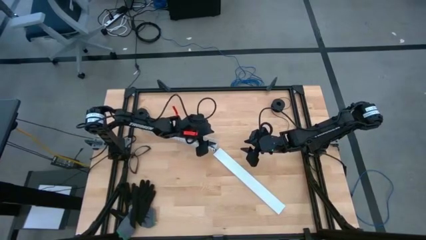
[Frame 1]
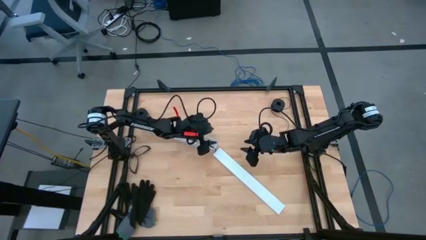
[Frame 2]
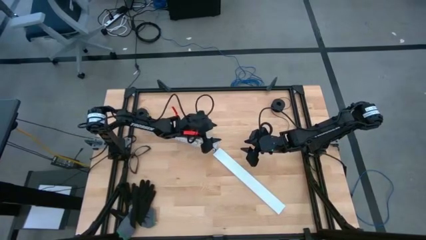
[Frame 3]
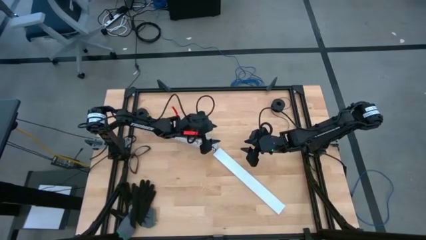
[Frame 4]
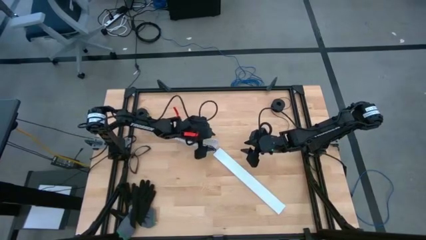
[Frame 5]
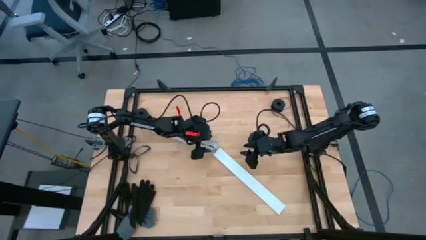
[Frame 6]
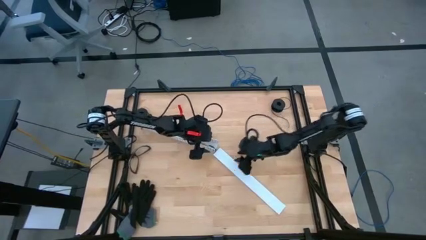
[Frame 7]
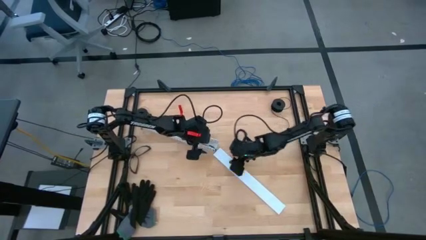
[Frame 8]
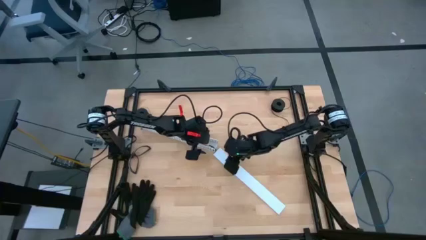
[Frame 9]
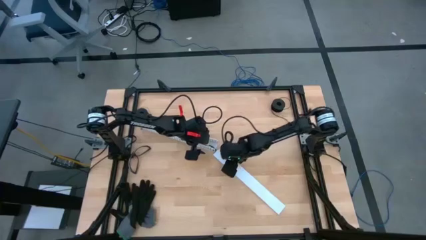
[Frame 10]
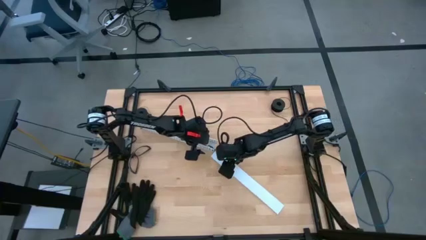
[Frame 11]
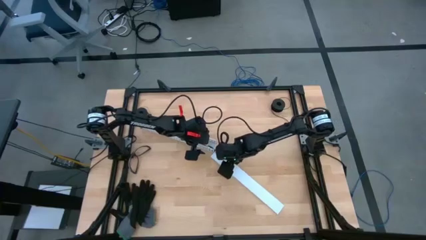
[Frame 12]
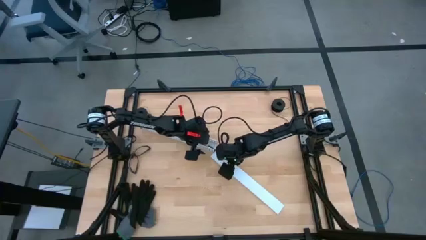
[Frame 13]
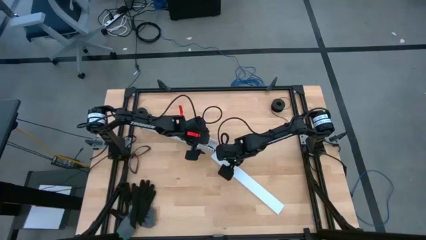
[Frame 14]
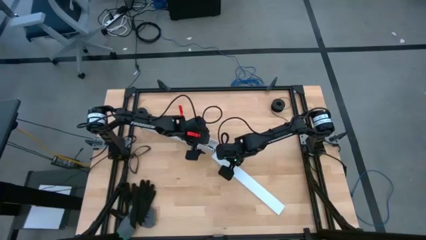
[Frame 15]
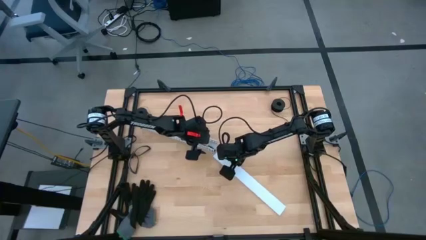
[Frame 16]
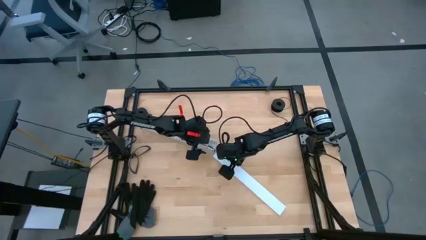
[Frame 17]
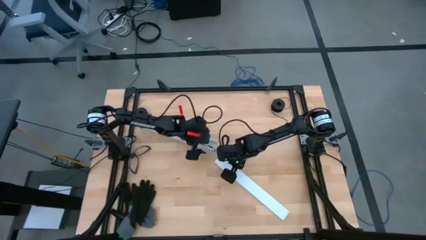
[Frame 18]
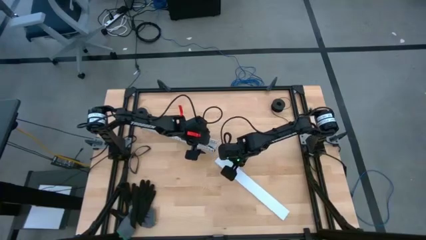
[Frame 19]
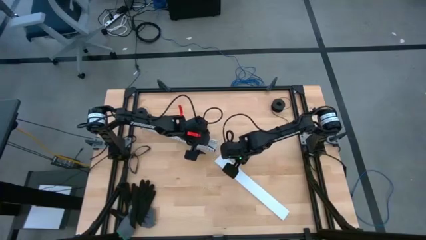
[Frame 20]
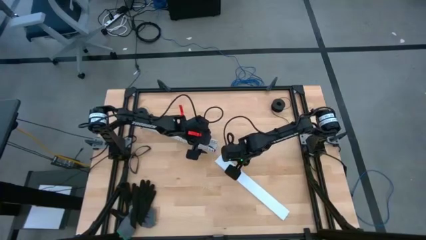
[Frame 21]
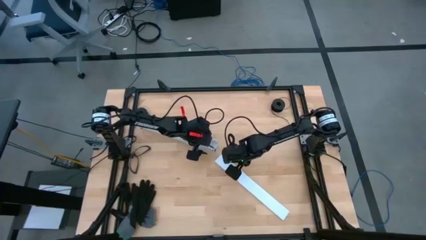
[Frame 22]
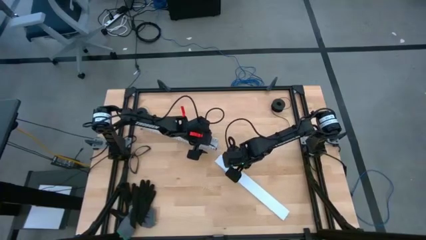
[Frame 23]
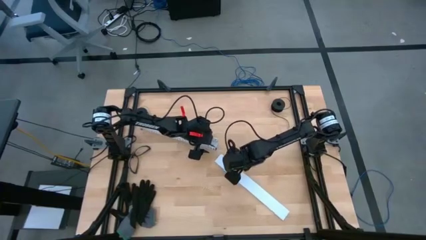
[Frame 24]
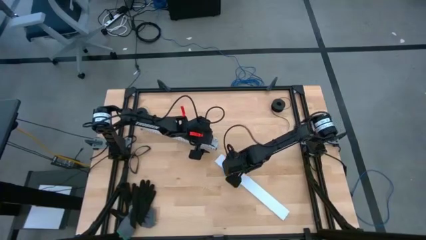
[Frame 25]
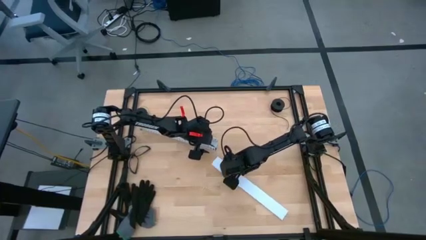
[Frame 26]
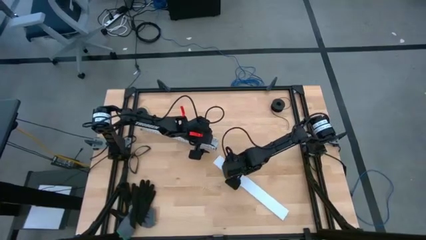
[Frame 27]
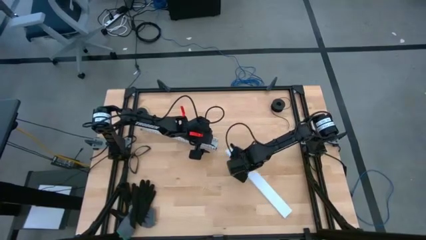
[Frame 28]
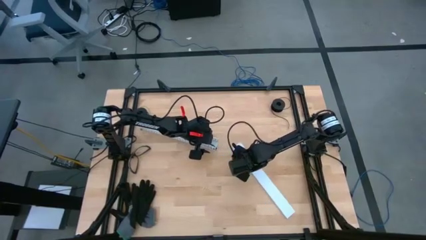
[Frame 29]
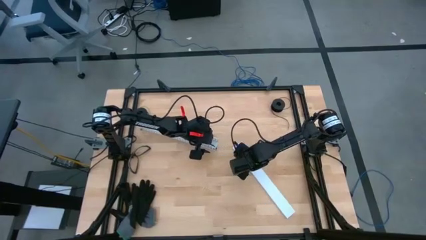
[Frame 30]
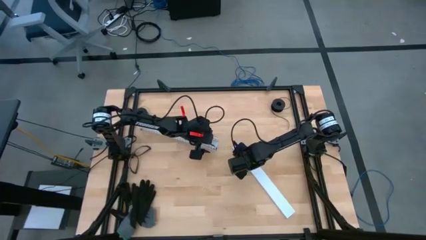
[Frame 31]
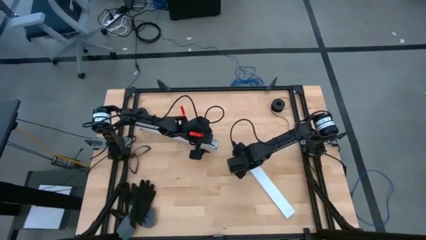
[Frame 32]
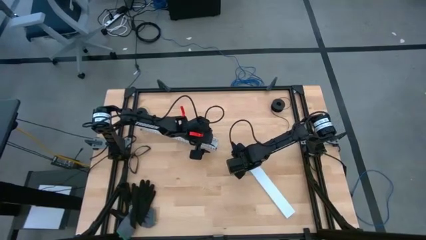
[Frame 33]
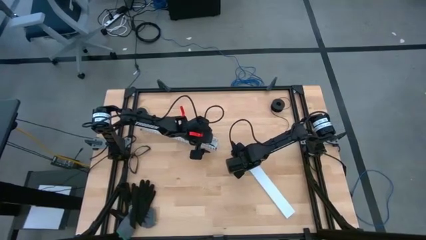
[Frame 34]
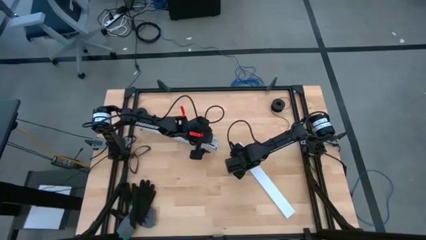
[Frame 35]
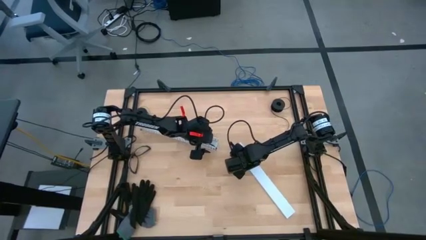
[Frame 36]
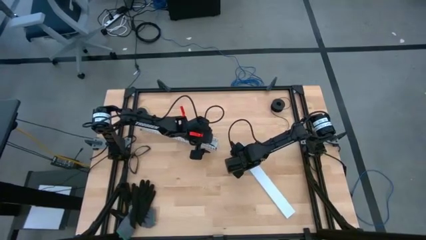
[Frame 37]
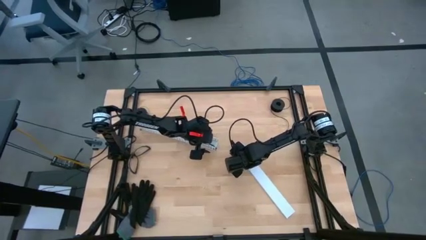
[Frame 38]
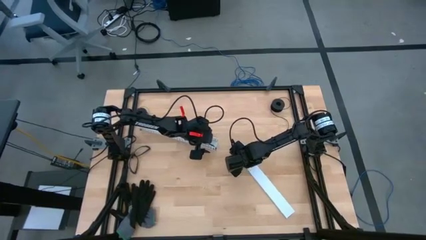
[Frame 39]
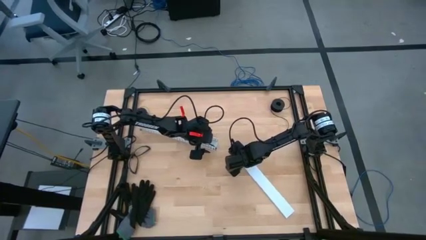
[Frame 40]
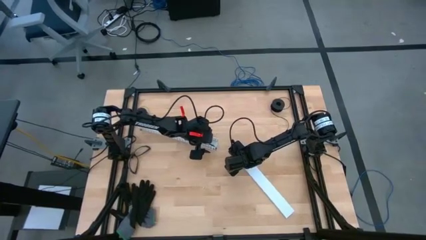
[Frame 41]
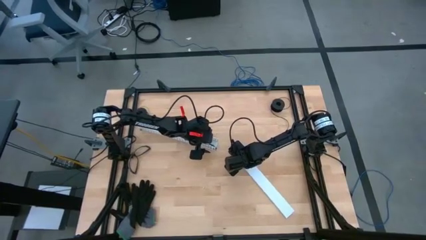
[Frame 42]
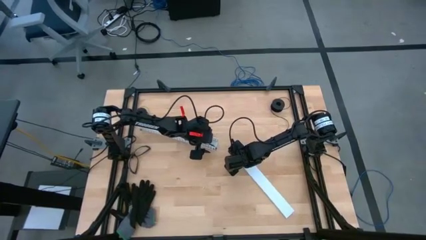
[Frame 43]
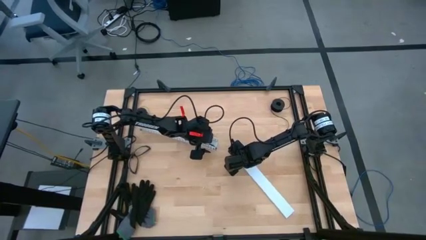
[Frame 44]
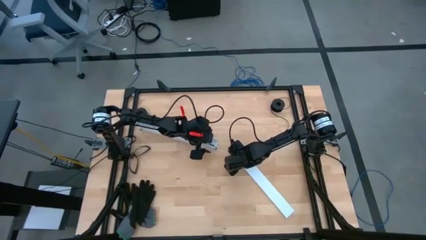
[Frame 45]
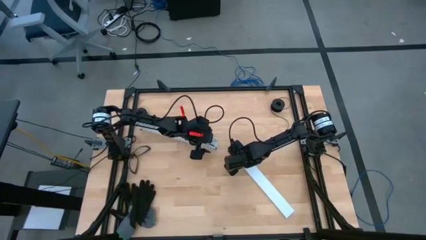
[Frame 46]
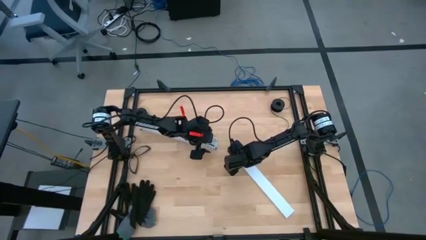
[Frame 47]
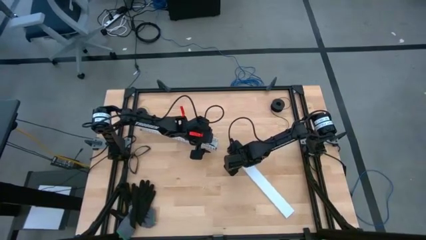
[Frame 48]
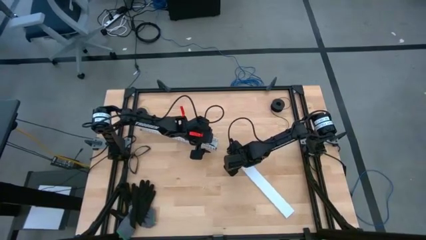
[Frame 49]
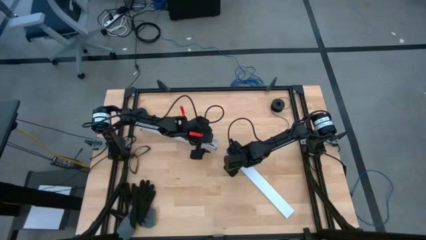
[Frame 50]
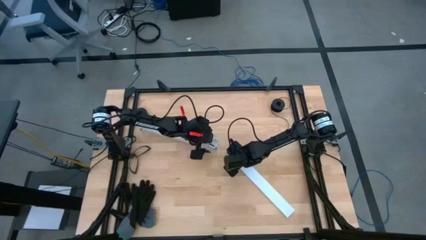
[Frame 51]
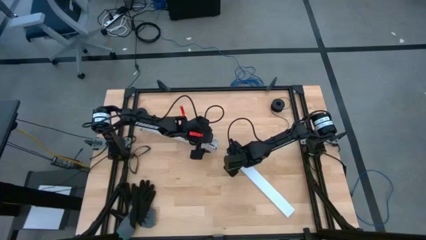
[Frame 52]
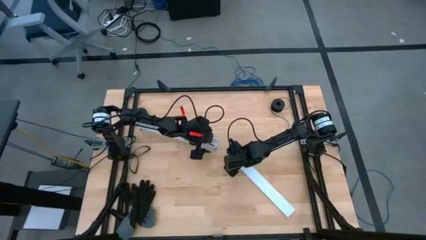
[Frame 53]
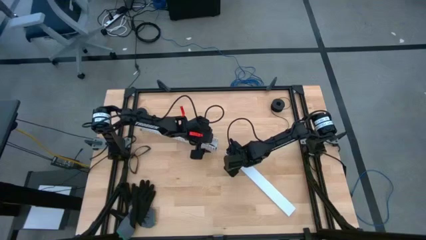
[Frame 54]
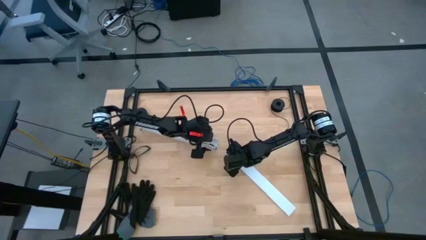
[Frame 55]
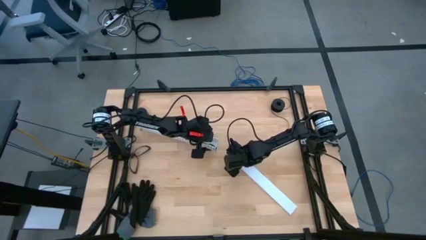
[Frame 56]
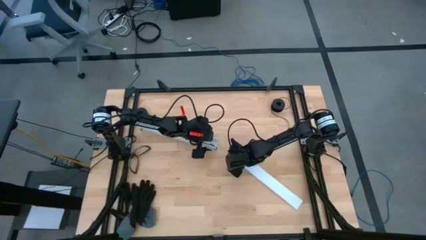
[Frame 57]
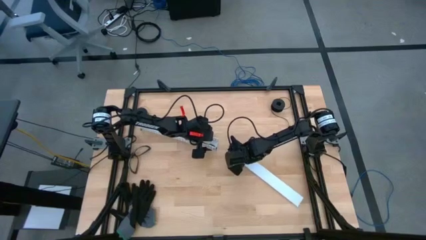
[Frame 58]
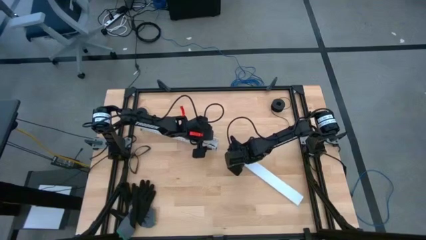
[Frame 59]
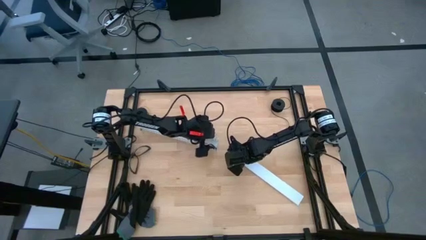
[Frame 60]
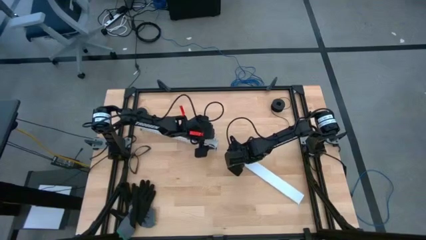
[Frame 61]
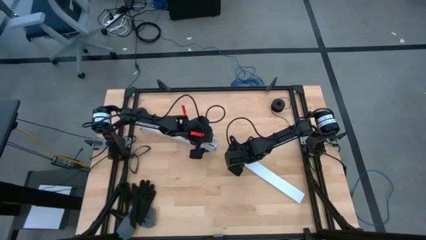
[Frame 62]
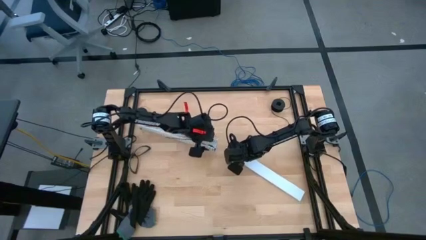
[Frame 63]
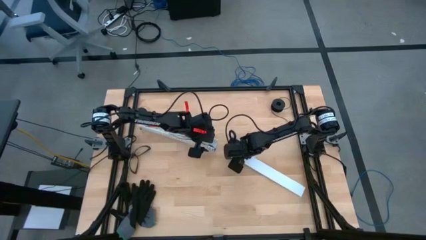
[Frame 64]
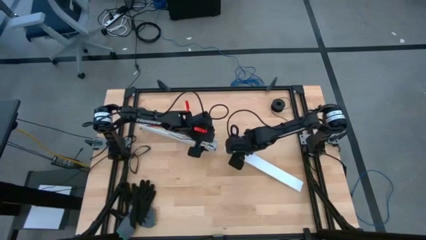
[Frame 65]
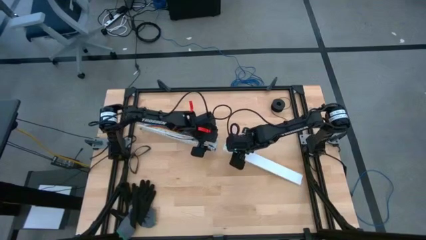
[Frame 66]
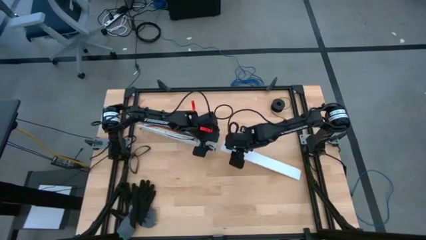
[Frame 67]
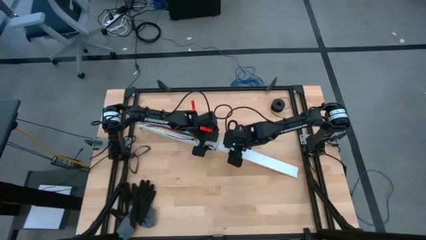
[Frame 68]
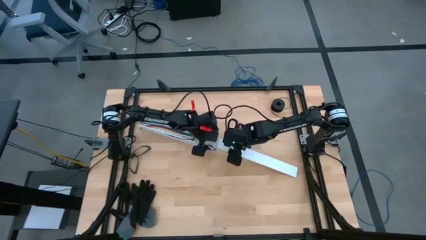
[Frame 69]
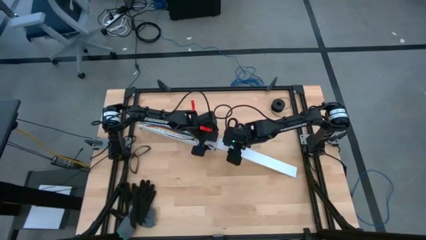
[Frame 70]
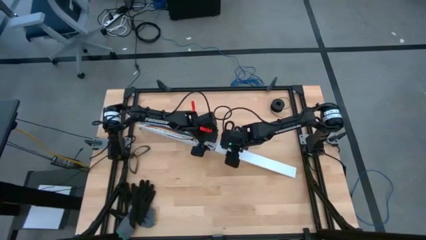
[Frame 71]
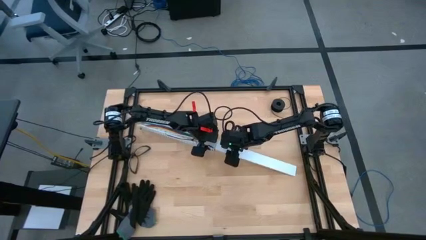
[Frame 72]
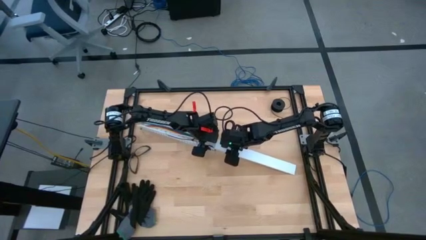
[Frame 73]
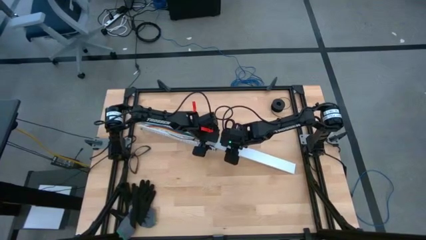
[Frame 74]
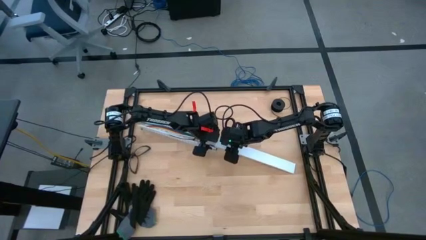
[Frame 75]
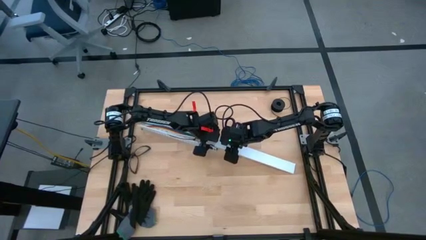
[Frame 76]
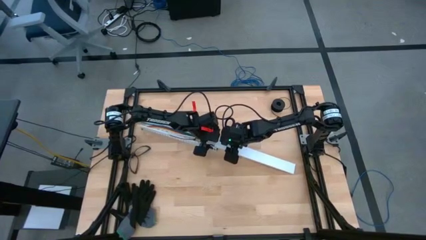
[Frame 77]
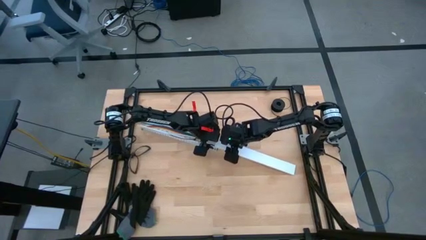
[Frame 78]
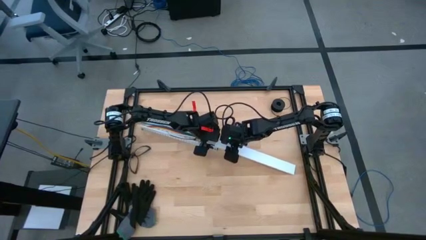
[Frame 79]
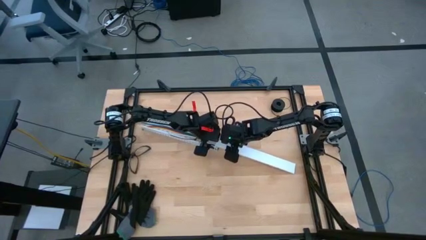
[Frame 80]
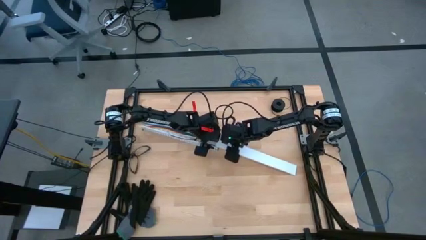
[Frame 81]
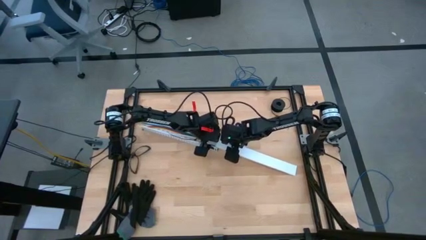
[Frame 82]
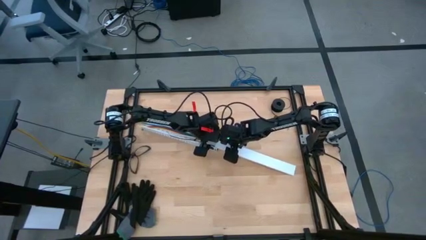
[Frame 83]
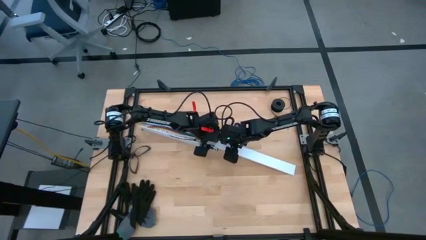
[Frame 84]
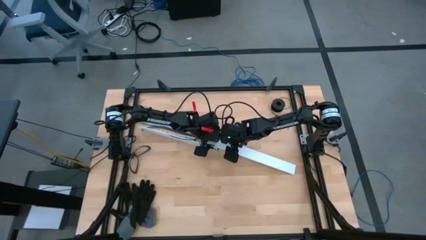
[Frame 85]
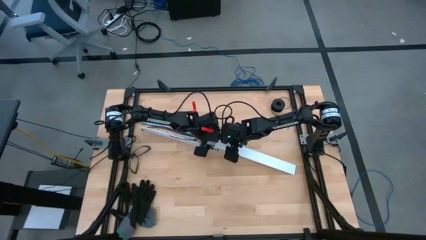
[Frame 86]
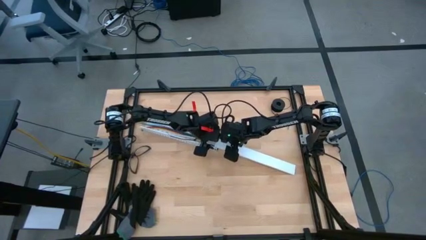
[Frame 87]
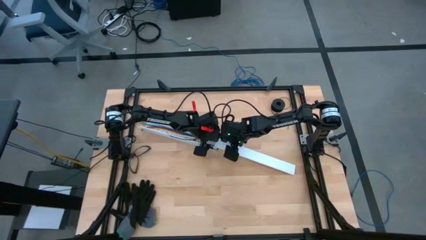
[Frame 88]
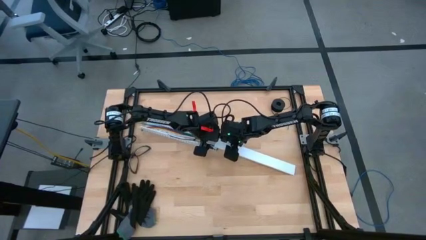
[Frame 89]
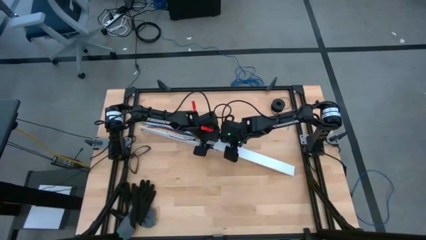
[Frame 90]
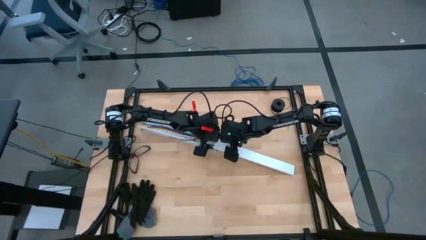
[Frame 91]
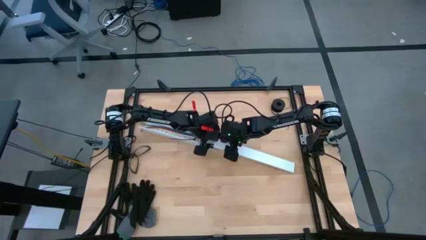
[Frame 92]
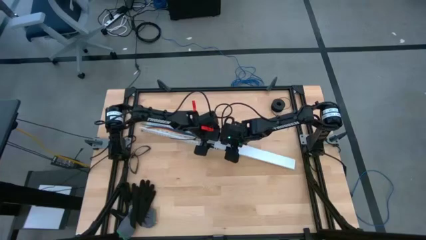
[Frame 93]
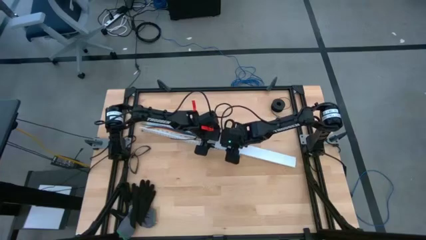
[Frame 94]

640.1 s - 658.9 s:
Task: Ziptie cables
Close the white cable duct
